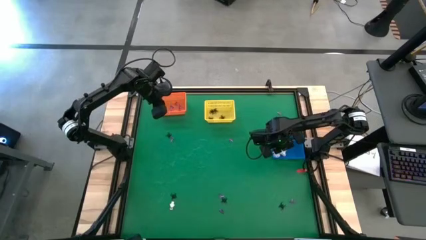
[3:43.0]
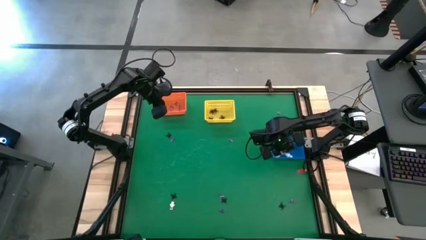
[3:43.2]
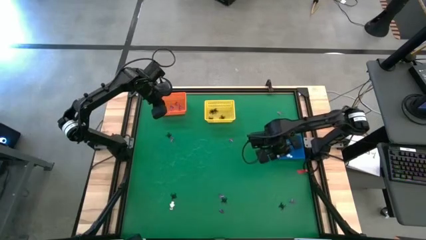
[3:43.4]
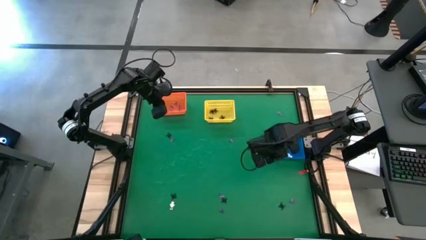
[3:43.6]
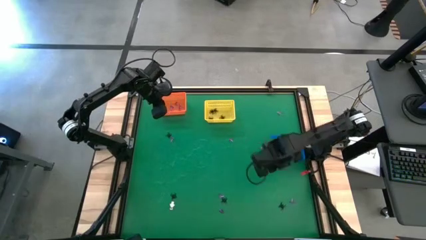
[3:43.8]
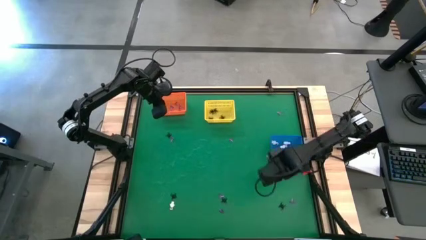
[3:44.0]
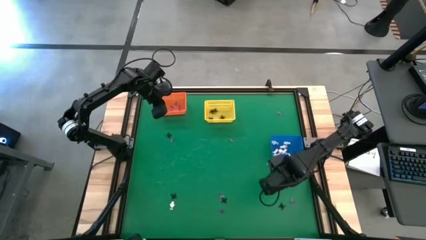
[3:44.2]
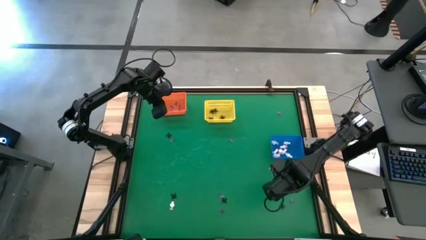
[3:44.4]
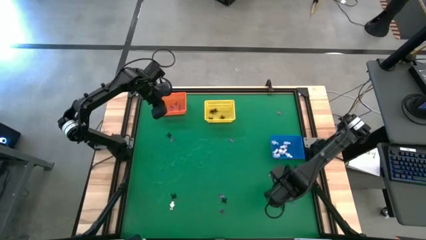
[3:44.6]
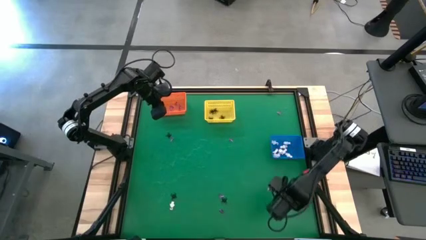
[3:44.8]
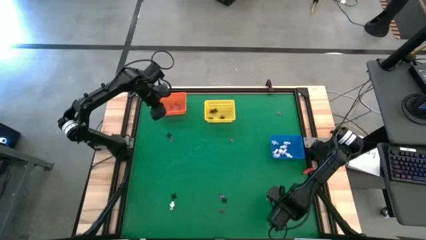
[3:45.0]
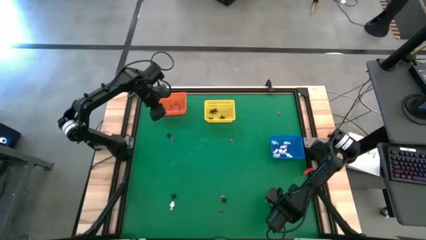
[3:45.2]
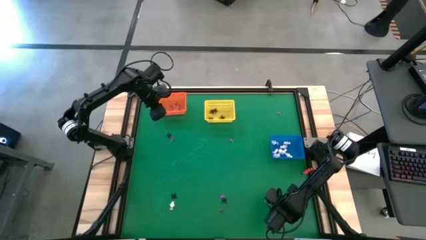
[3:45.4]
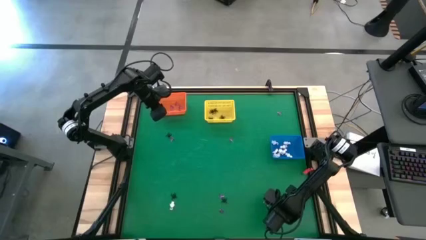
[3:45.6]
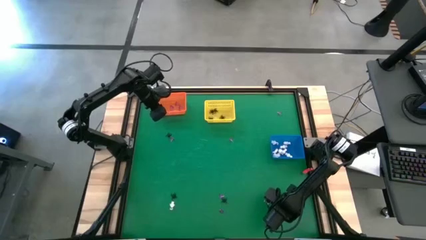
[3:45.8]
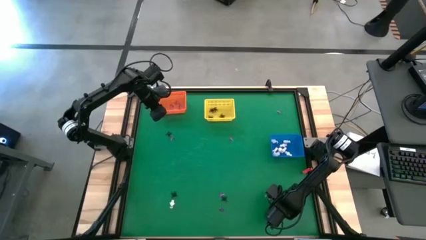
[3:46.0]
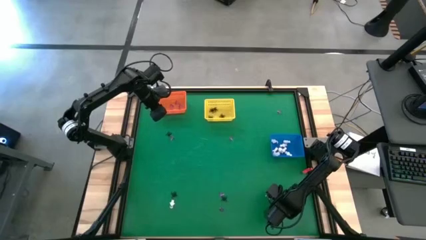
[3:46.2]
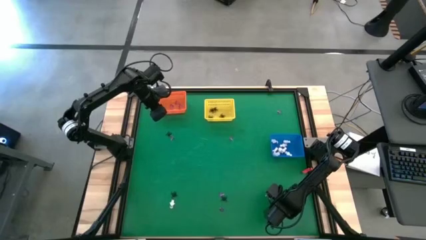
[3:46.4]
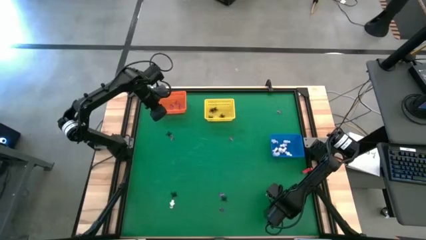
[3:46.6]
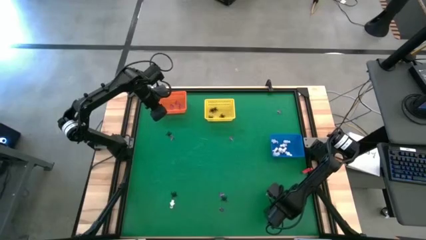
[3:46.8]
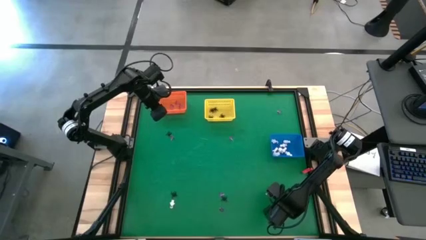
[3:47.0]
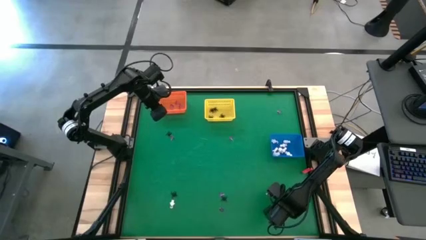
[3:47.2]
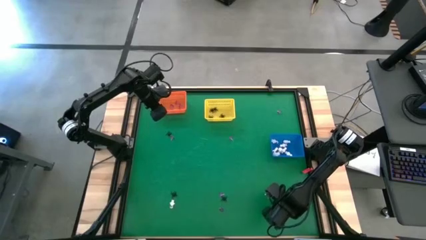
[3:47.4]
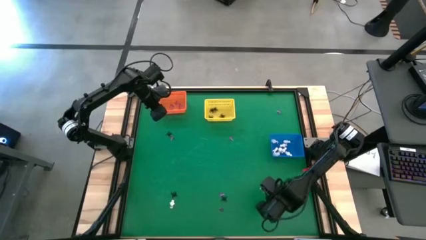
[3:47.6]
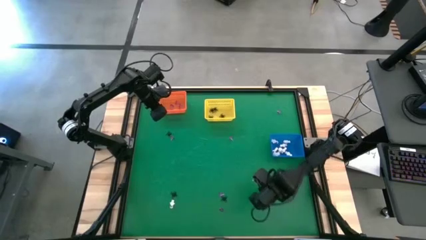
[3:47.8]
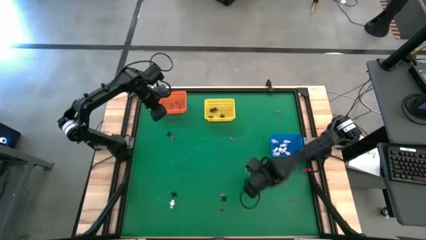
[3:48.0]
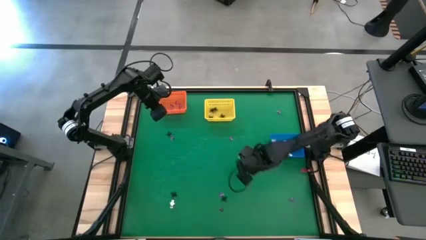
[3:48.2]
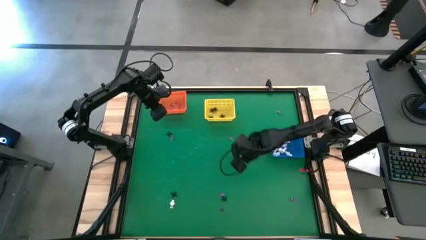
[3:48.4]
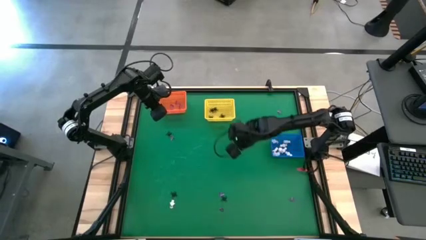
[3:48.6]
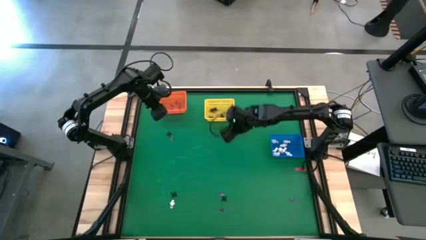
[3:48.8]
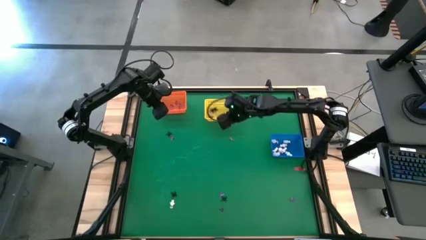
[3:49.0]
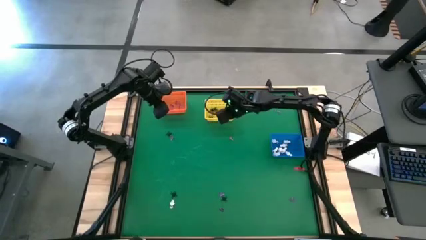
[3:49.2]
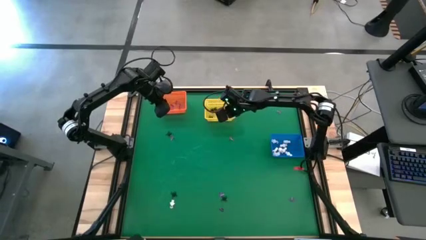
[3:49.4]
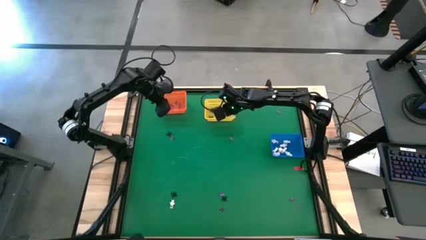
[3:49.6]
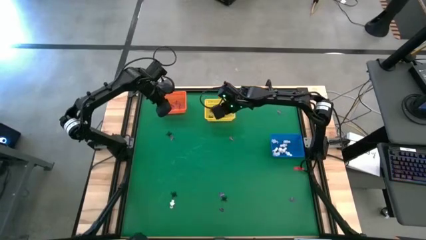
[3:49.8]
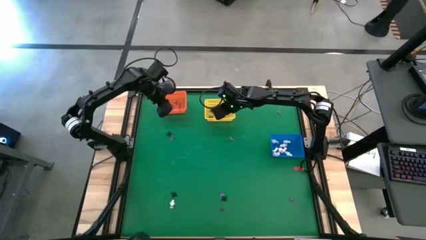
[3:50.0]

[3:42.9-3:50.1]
Task: Sort Halloween decoration
Put the black spider toy into the yellow basket

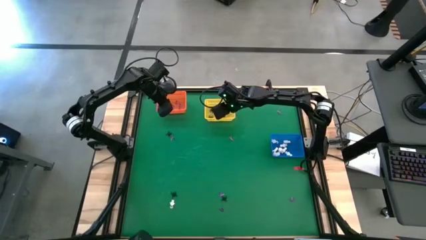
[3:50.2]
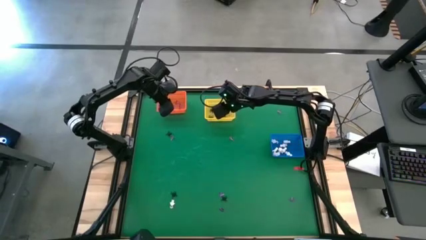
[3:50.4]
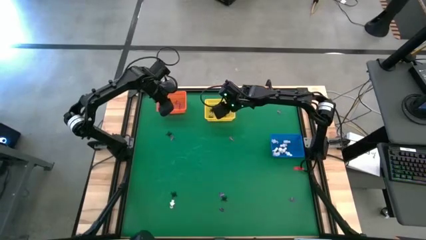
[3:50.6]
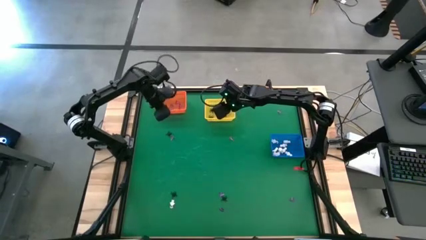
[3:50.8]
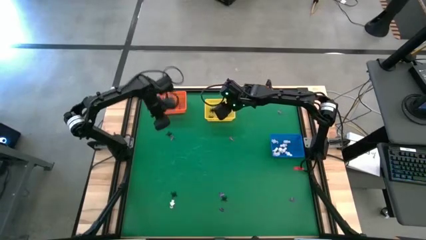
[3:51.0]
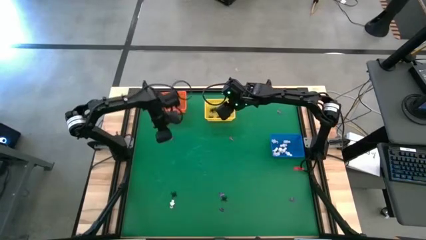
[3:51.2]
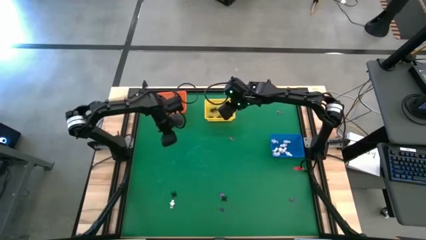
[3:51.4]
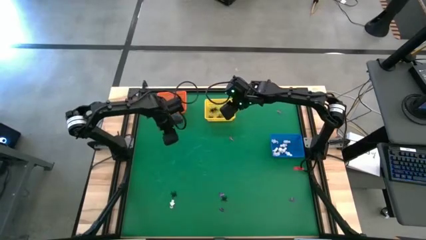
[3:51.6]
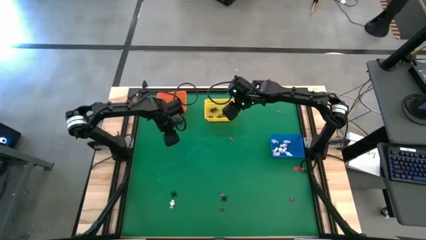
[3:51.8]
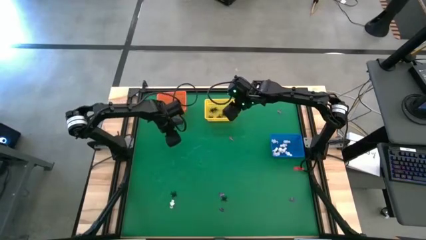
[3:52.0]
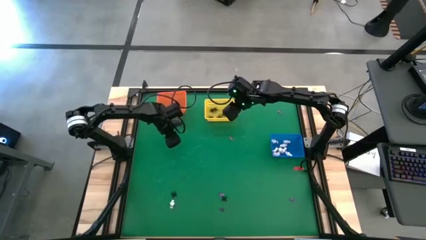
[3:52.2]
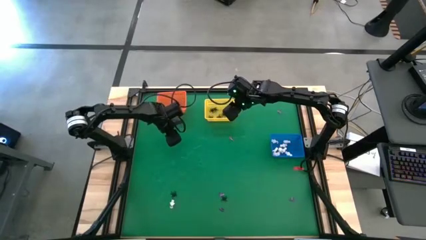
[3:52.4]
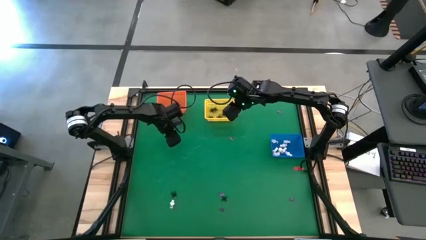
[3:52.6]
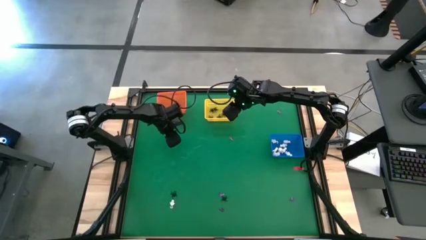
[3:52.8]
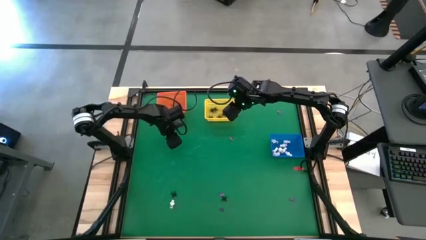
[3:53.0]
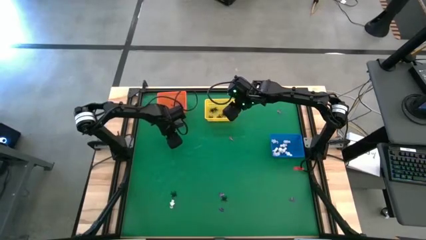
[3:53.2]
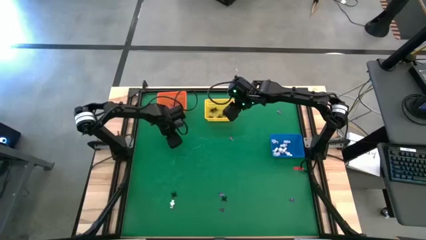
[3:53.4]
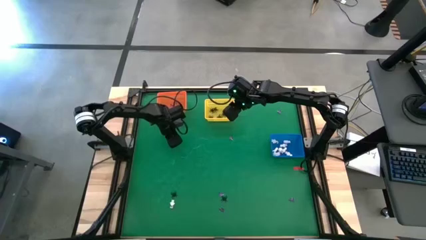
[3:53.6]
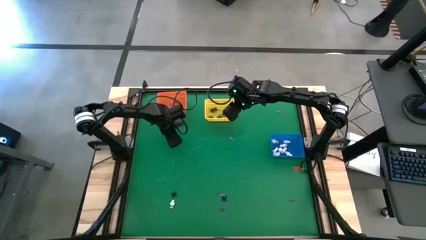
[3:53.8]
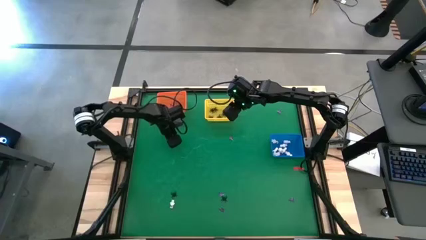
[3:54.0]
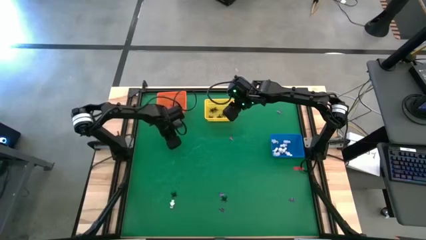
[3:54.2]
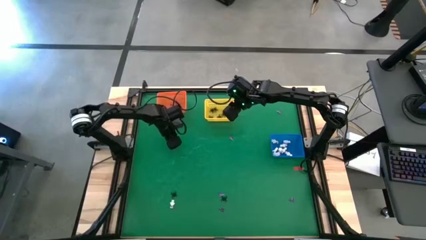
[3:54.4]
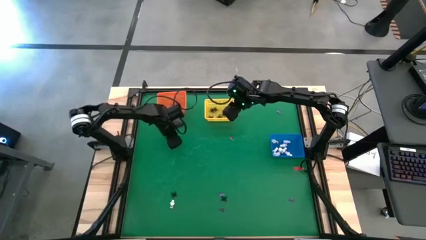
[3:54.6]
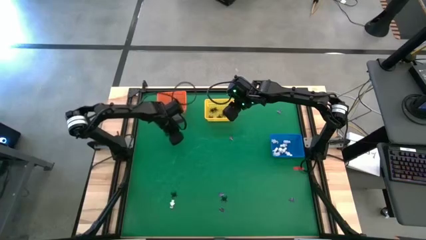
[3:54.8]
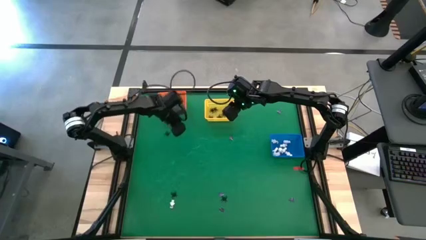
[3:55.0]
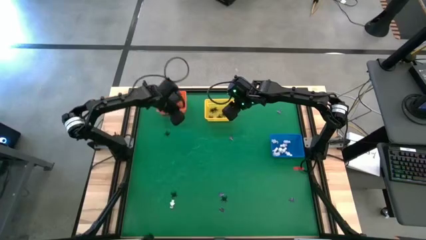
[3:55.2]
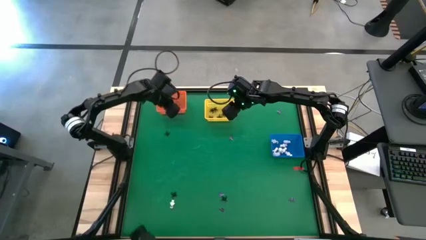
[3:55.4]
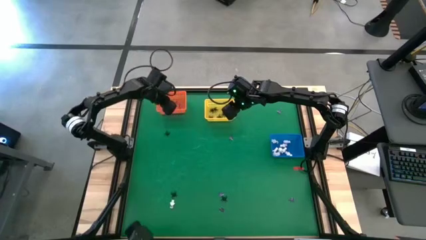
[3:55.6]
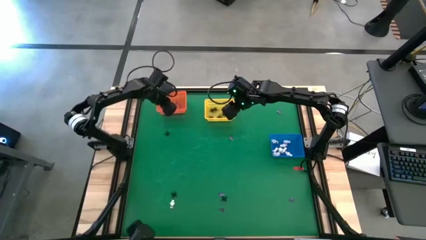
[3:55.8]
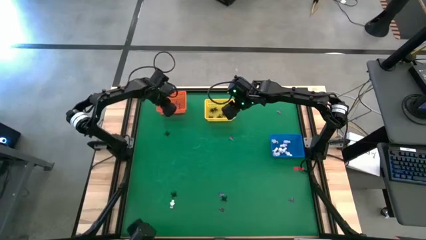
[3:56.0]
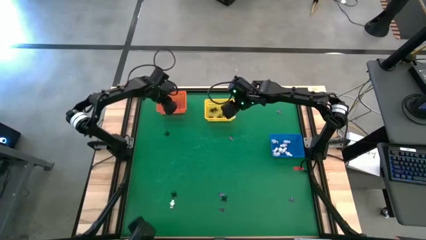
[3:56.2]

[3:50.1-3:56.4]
Put the violet hat toy into the orange basket

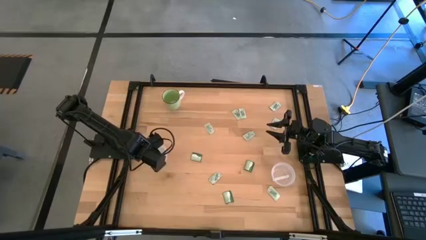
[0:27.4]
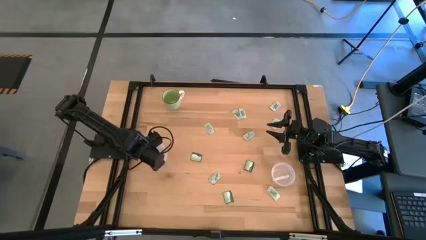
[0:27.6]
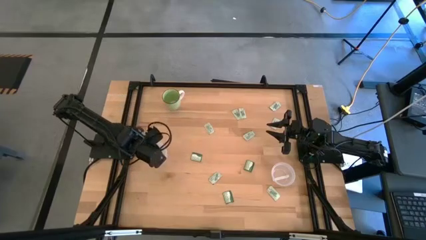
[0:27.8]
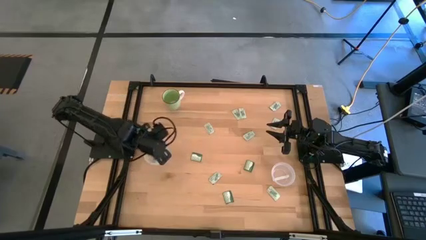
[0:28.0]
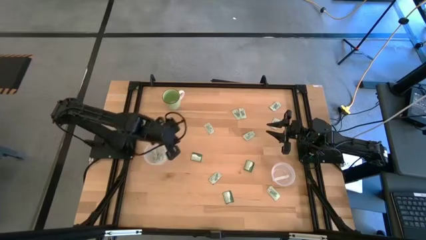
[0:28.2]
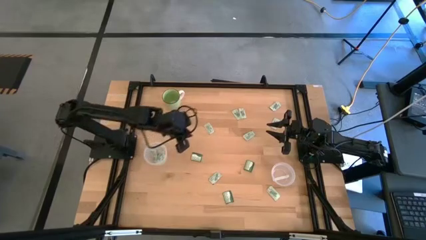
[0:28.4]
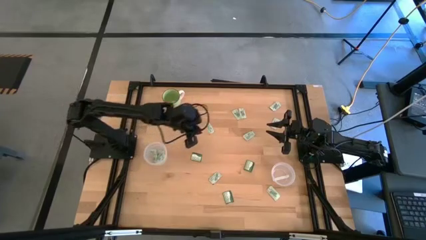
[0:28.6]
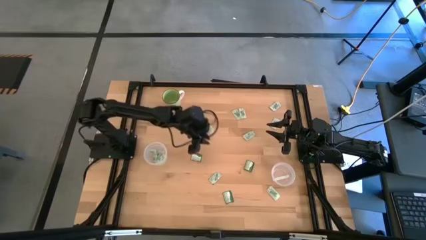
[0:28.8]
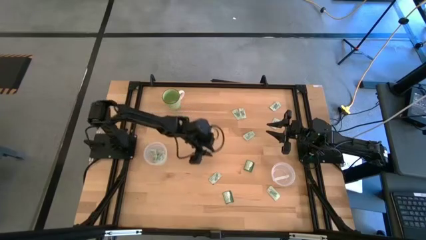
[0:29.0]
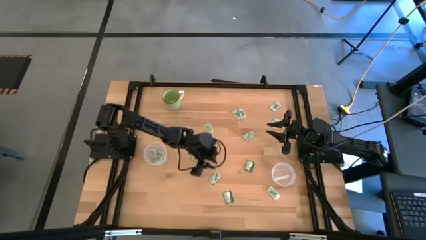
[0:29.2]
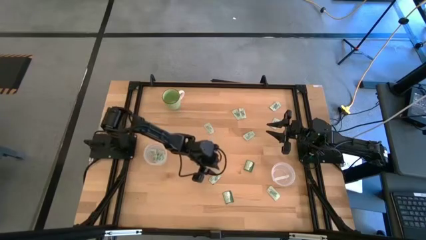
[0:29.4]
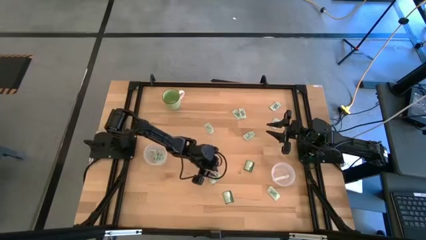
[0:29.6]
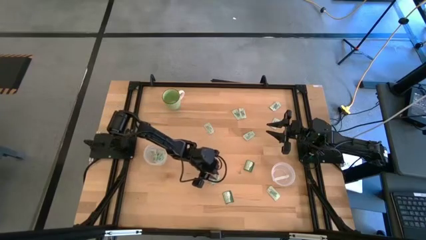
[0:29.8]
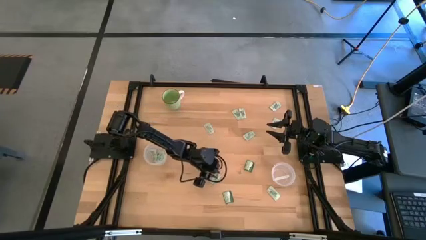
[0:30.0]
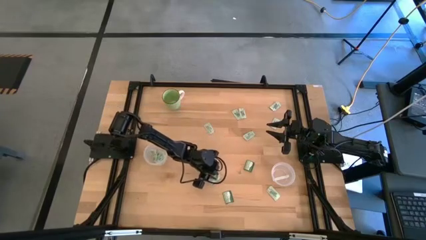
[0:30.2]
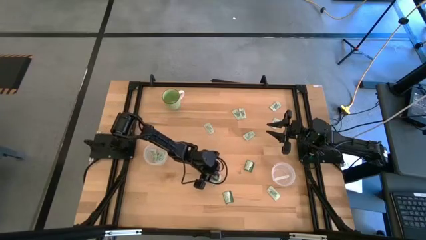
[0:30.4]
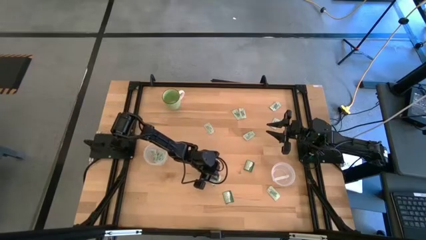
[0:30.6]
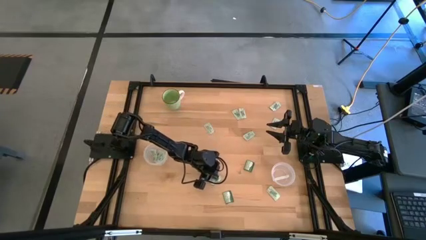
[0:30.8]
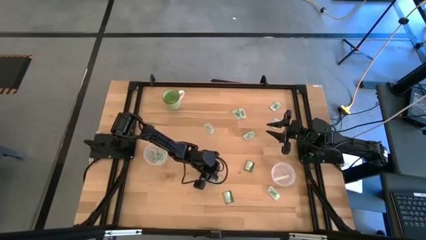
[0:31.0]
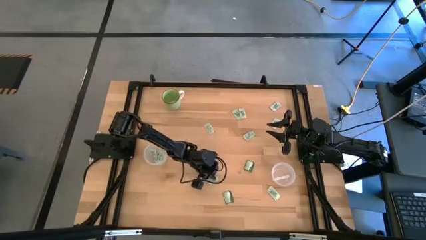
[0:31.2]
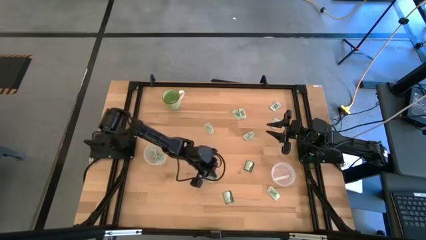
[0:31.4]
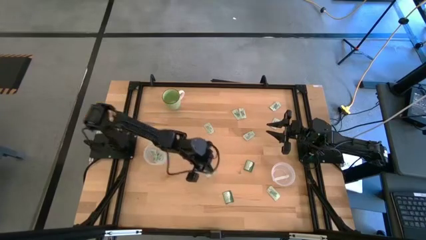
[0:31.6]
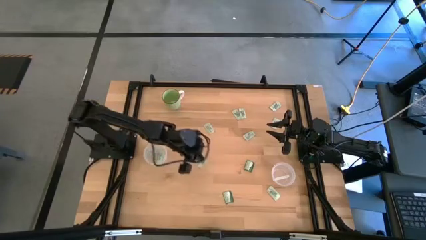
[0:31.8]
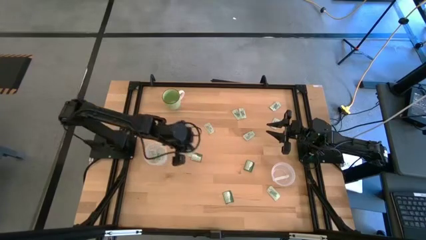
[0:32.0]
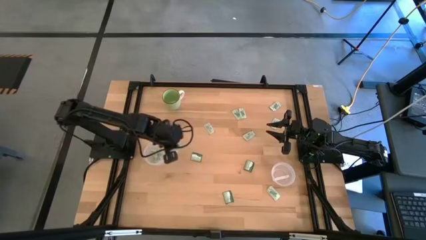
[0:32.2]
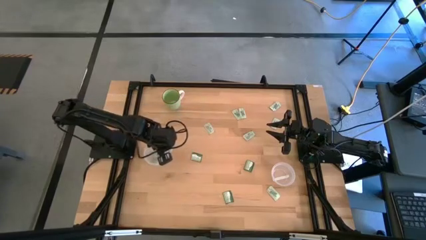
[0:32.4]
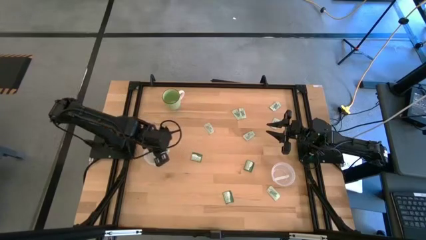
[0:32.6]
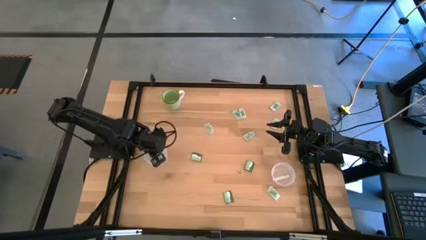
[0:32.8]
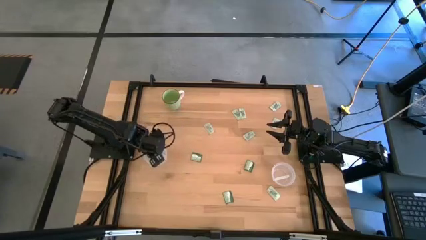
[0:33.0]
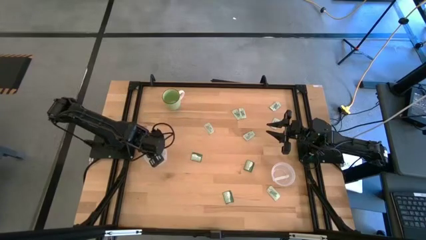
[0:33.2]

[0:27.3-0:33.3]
Task: Pick and place items into bin
Put the stevia packet into the left transparent bin
